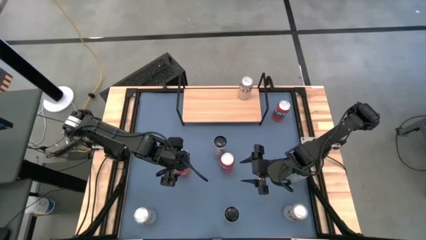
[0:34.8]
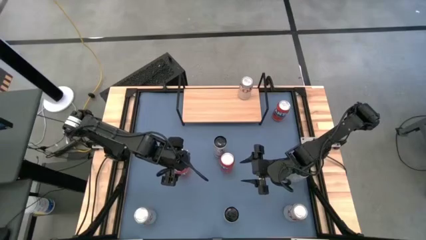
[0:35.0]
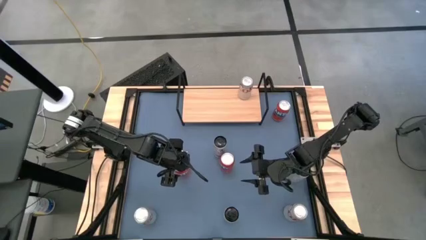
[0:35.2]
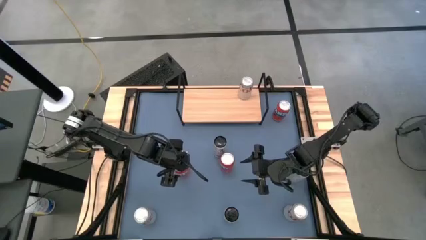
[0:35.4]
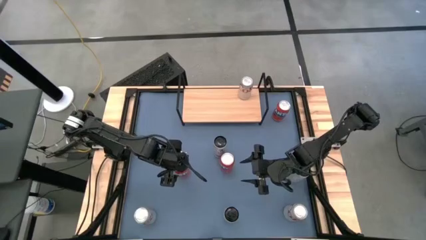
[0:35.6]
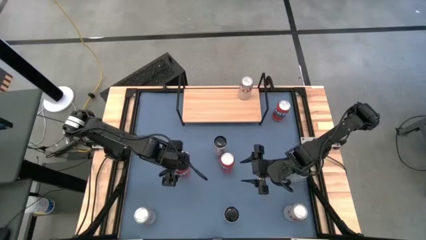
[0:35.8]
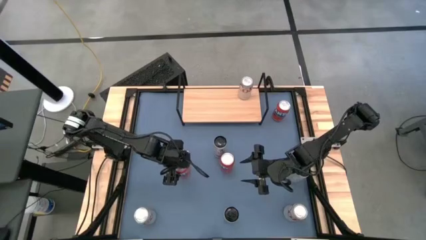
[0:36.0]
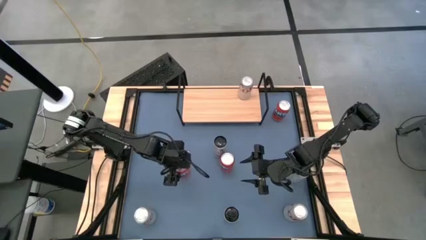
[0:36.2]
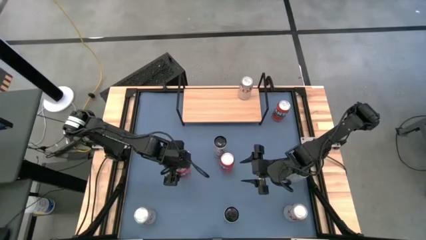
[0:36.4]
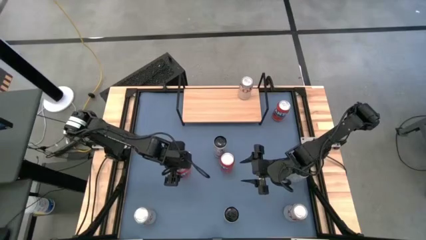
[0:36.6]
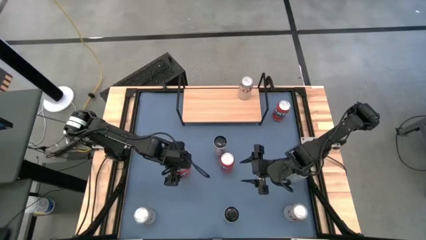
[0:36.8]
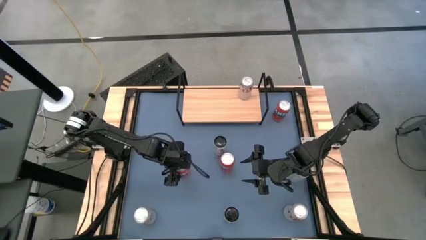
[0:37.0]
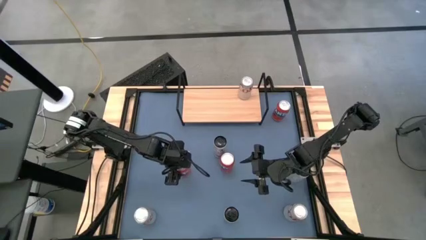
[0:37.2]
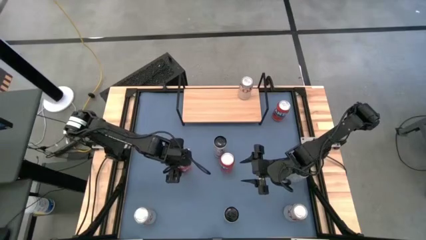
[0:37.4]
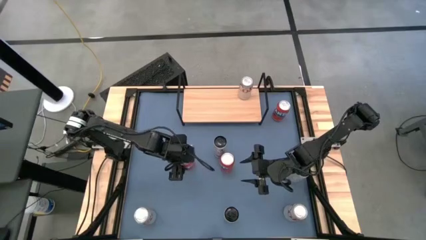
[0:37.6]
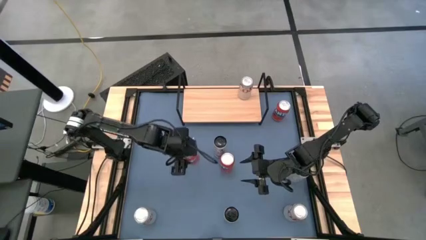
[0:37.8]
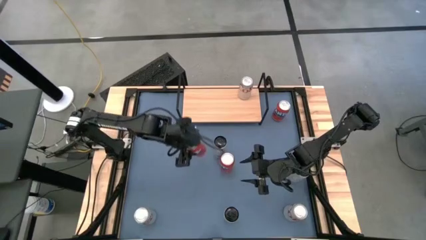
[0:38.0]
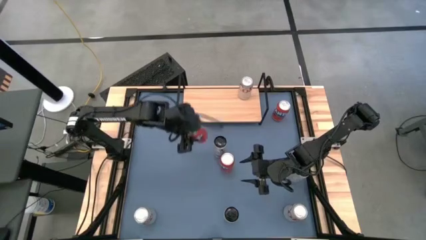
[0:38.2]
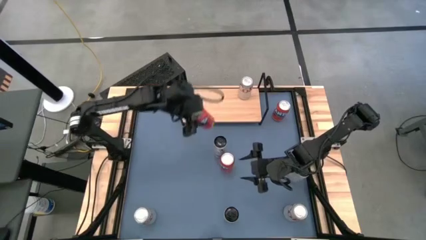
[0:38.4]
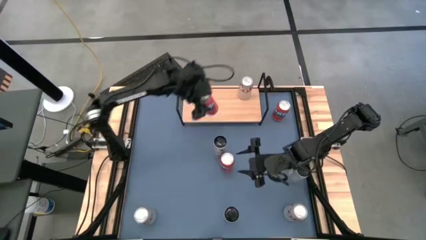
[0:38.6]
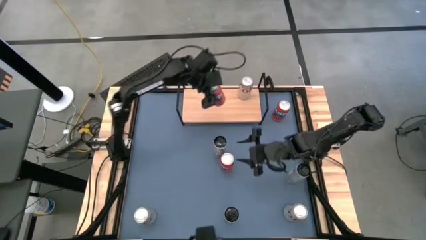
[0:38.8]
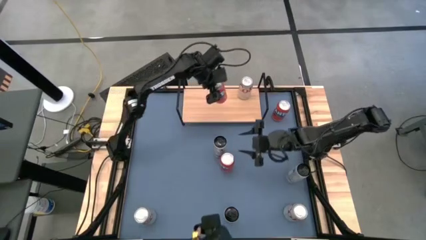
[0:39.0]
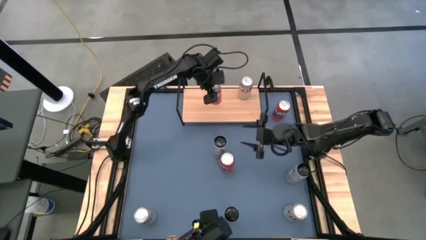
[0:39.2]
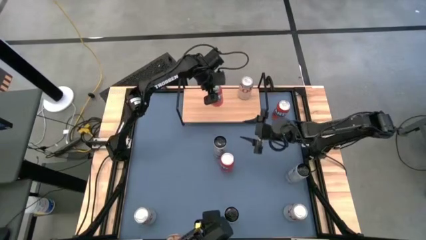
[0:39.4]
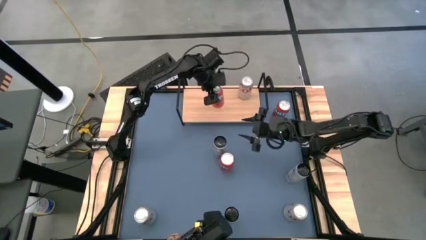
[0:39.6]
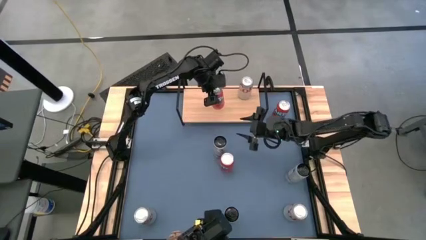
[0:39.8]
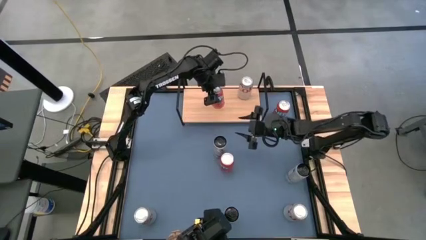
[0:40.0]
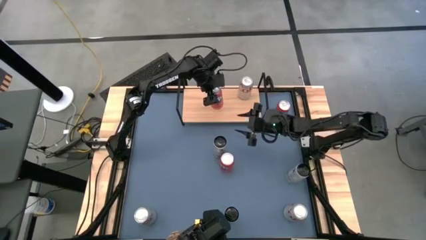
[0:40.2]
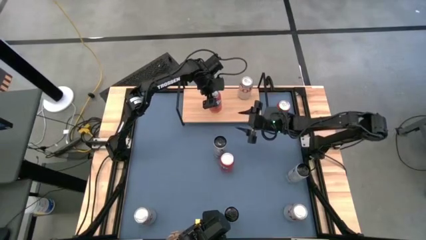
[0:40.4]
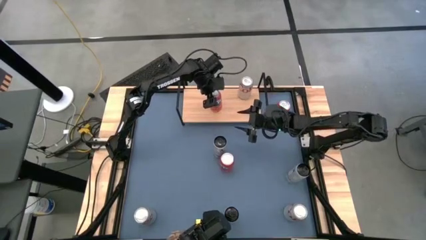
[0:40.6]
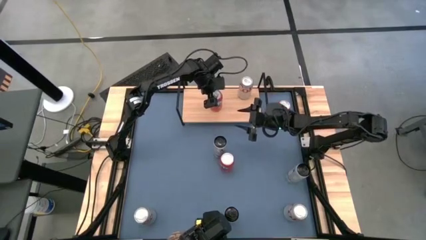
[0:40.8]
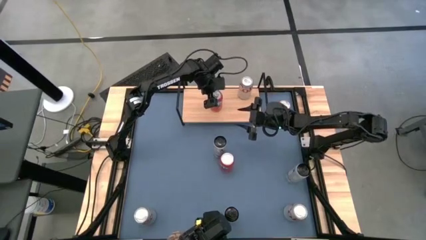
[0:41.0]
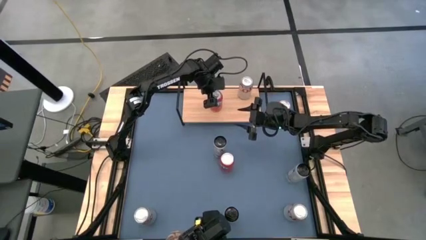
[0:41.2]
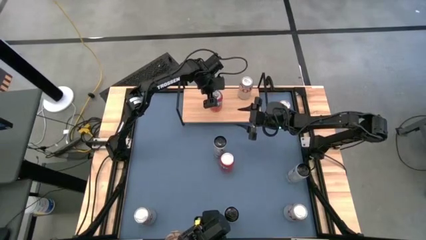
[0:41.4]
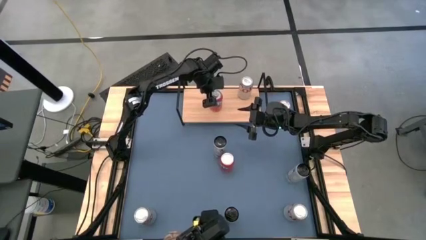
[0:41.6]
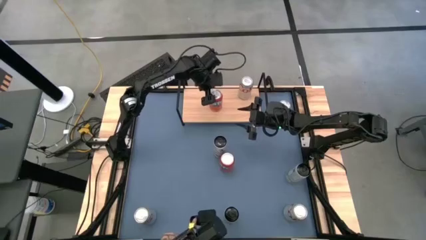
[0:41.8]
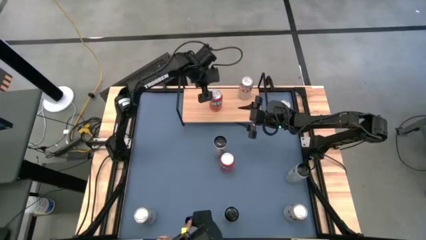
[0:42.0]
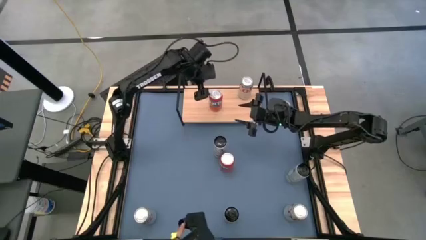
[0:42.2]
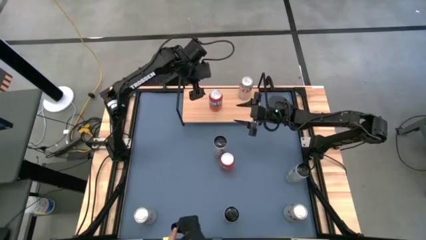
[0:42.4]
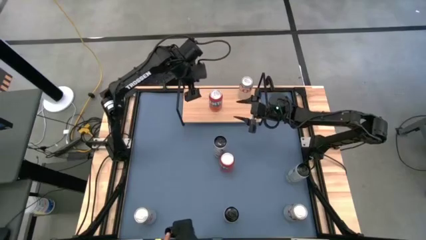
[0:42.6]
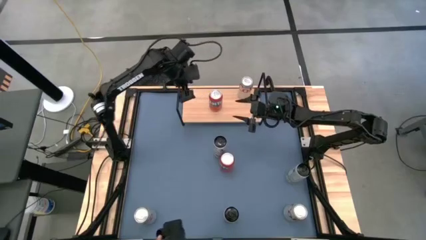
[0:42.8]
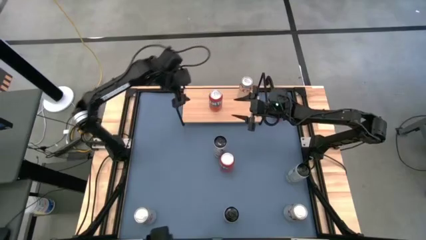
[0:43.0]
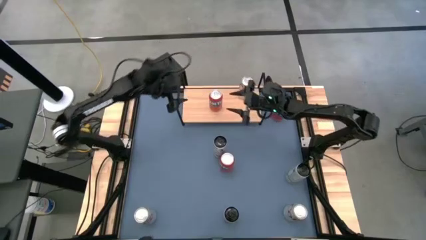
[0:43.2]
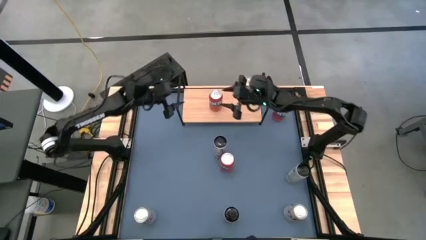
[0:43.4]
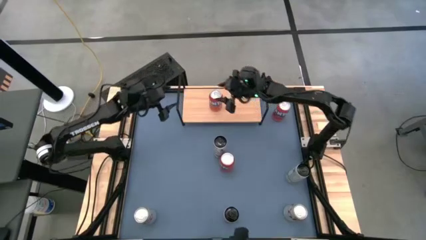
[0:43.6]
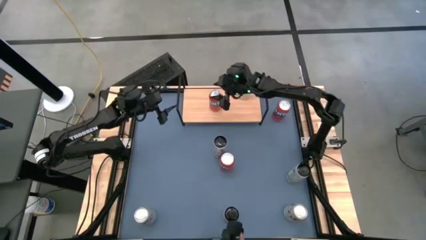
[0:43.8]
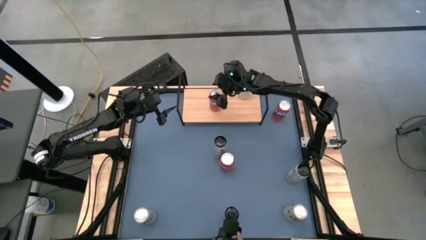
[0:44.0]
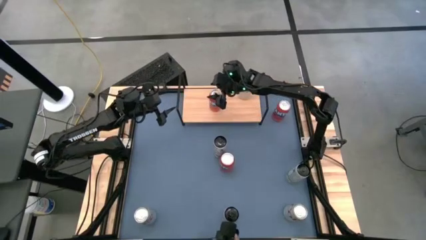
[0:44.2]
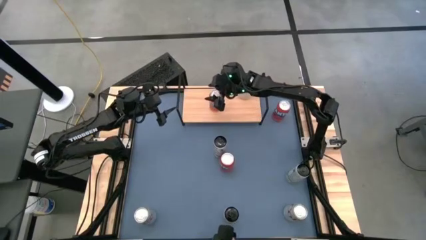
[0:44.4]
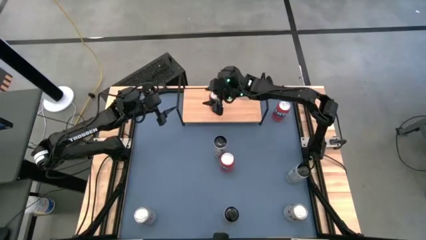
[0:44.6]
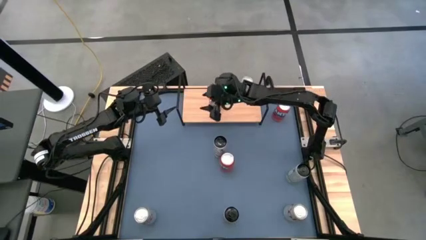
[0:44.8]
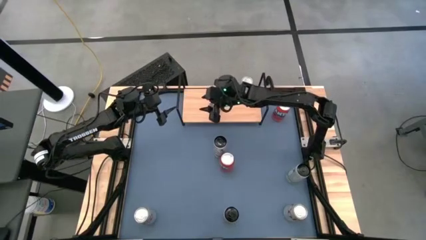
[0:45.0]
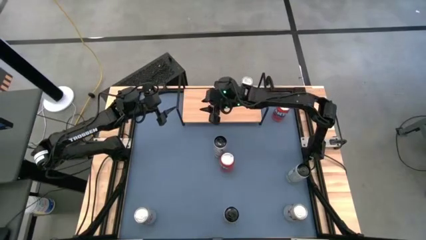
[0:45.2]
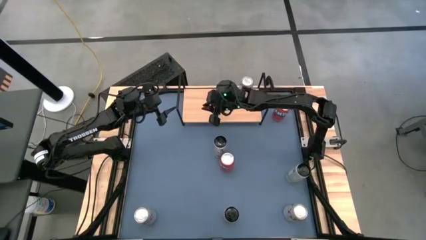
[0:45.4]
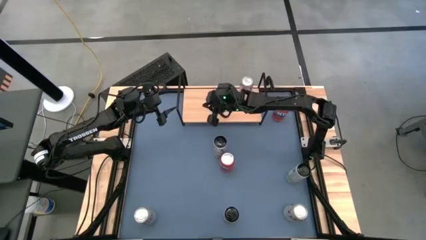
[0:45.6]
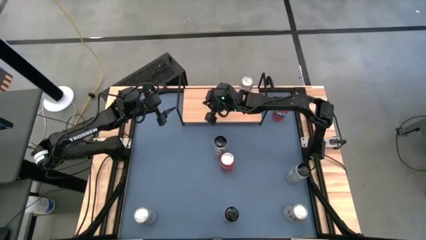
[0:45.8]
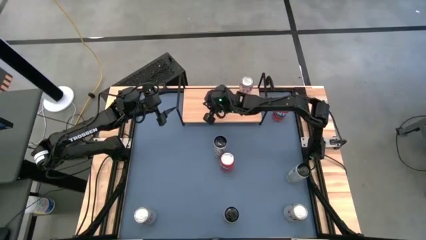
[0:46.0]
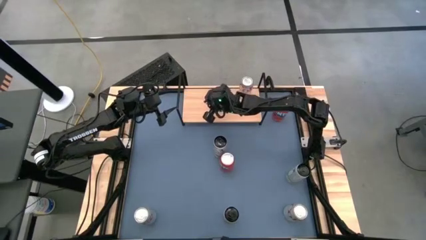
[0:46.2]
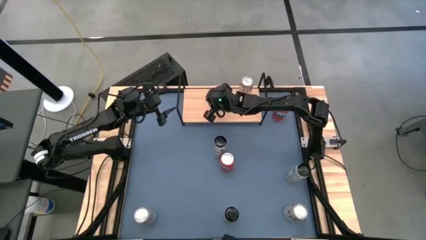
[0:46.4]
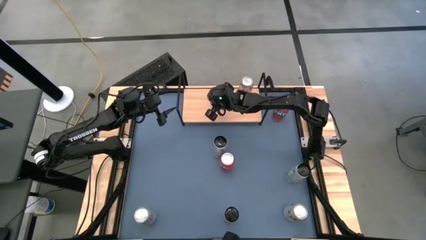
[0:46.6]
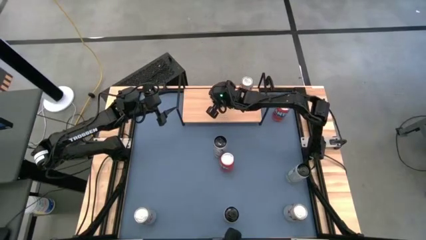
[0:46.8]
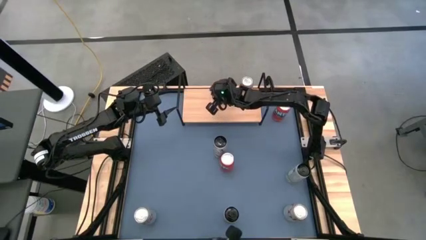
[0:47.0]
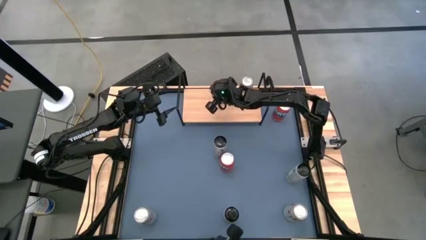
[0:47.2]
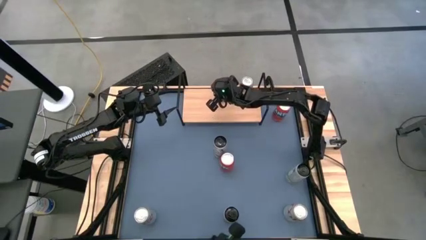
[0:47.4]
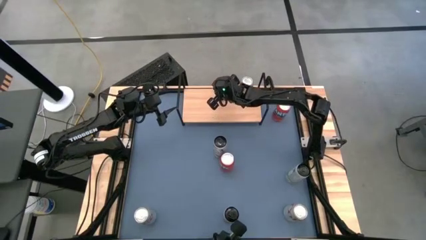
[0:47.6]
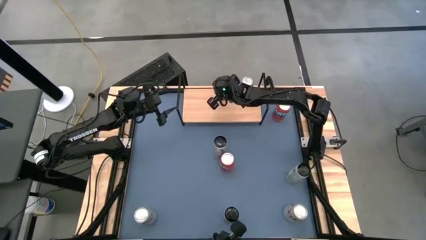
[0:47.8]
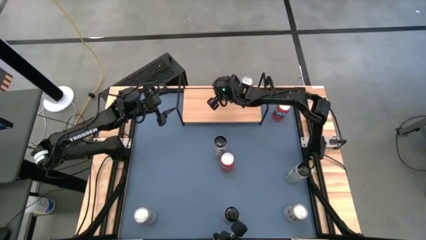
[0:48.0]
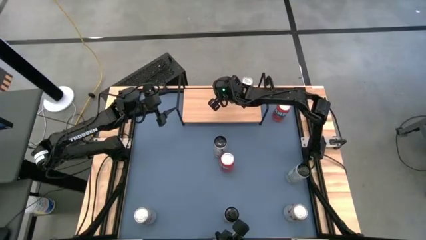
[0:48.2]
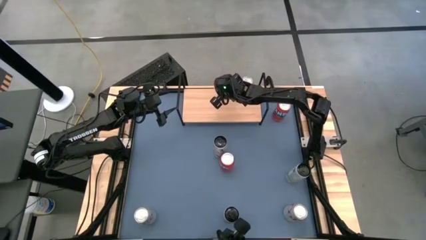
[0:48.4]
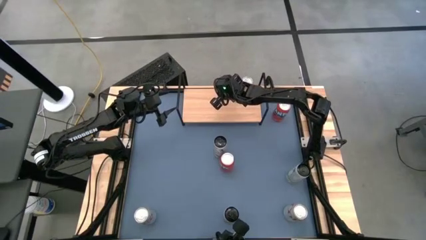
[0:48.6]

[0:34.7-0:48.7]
Task: Place canned beverage on shelf
Put the top left orange soda can on the shelf

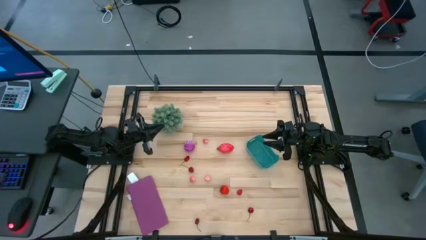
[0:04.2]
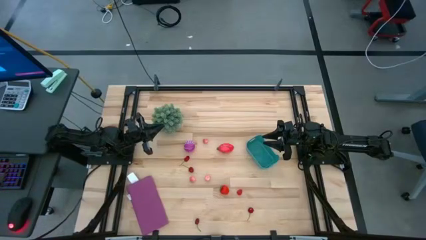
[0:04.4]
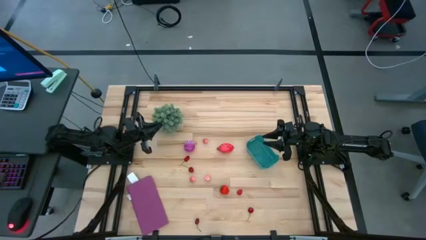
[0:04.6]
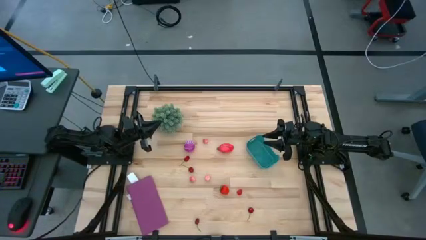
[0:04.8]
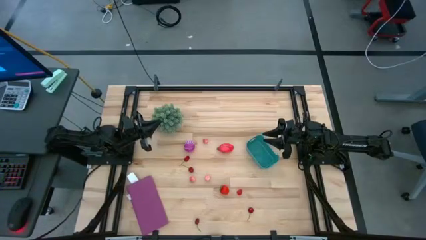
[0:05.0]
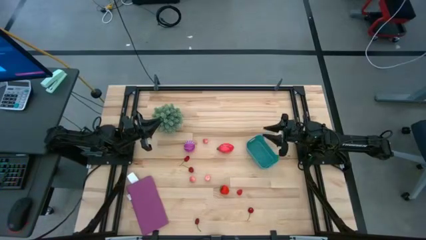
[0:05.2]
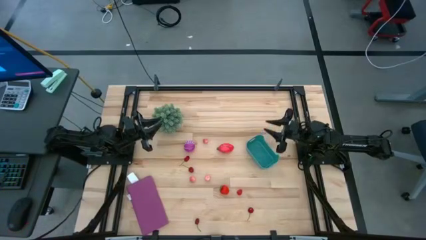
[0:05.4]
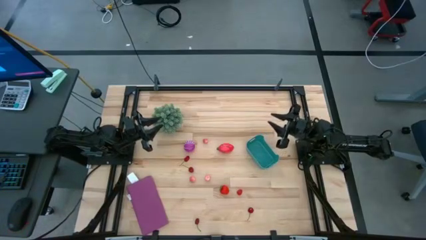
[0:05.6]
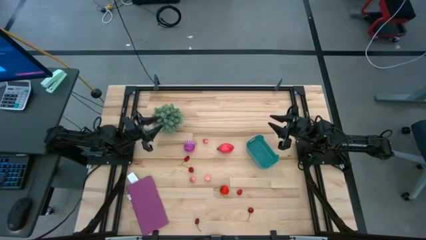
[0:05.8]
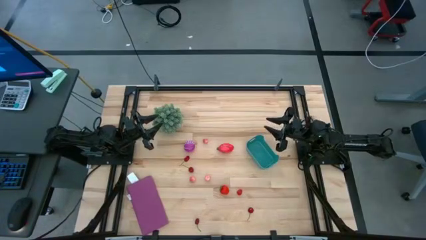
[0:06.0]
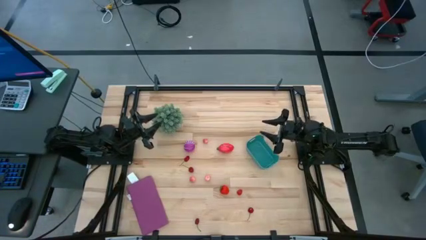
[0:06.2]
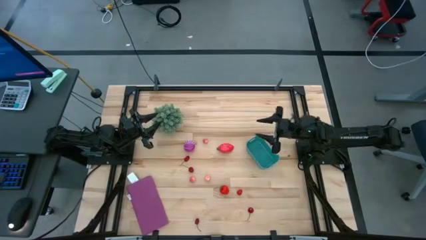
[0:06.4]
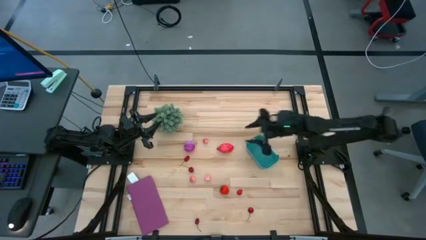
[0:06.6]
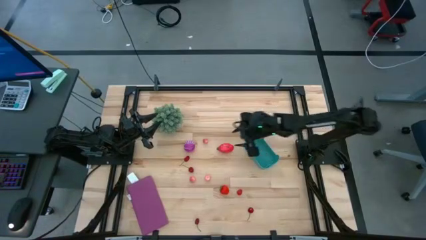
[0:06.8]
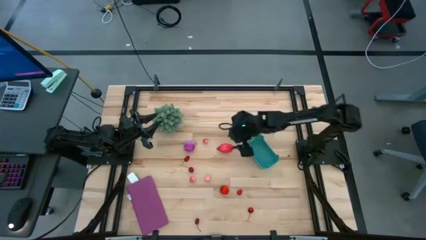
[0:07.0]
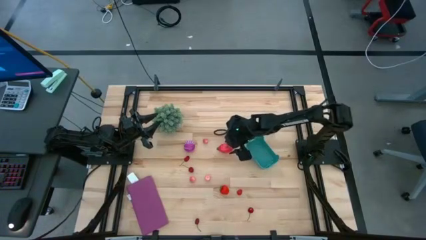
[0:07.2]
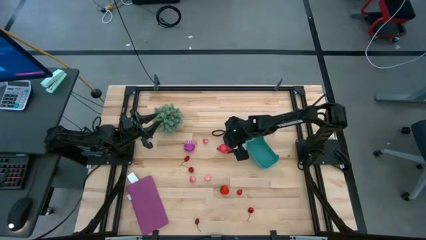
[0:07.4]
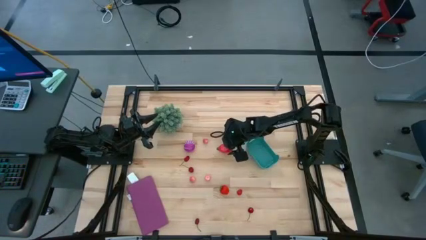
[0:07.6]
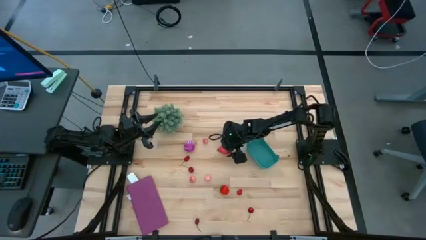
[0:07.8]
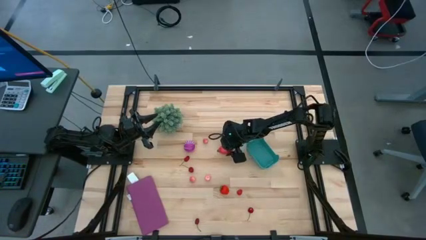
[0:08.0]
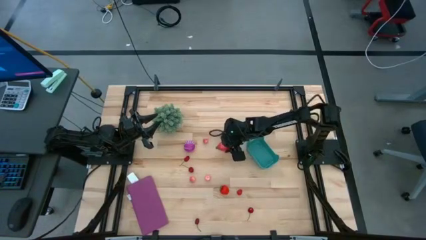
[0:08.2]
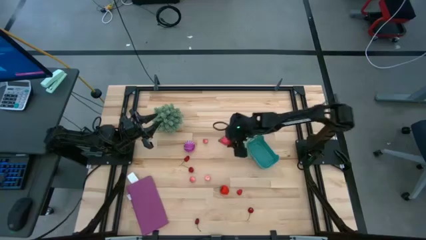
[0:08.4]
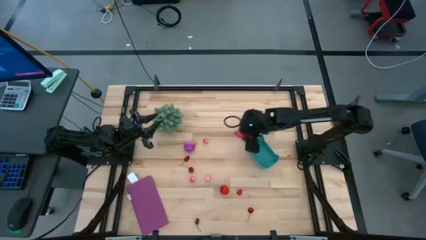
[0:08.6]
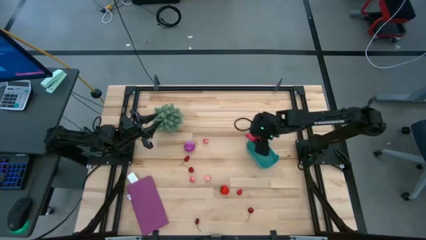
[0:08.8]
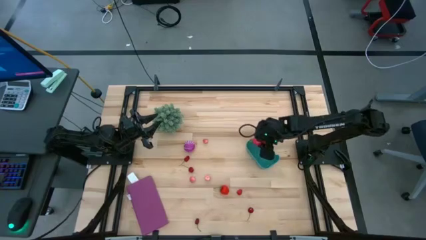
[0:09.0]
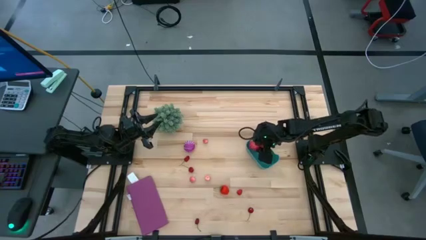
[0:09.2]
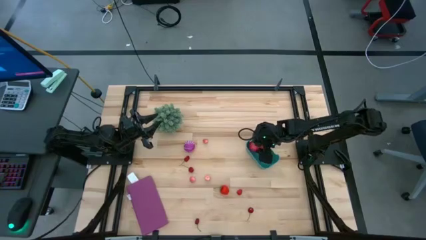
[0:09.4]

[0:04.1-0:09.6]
Task: Pick and placing Produce into tupperware
Put the dragonfruit in the basket
